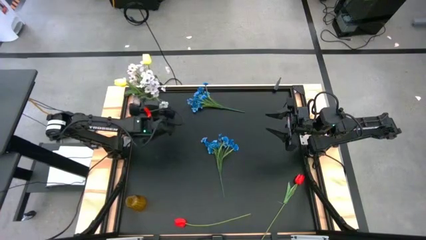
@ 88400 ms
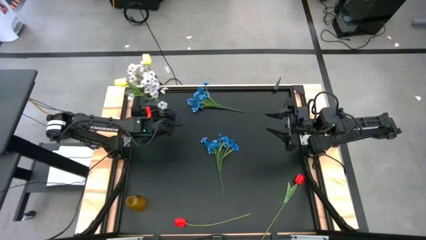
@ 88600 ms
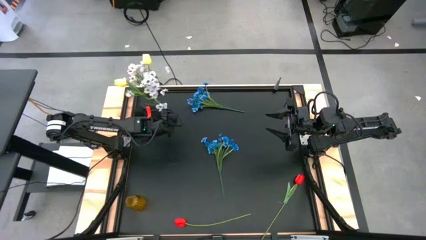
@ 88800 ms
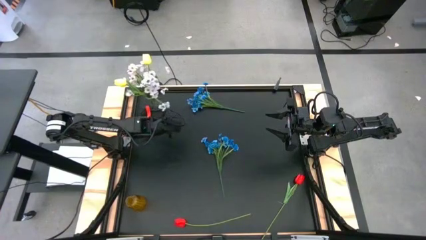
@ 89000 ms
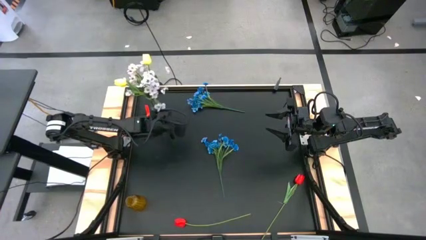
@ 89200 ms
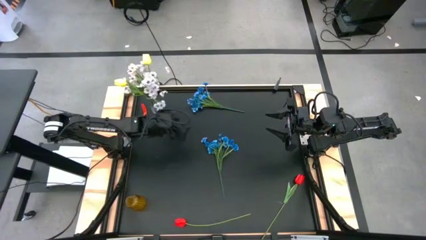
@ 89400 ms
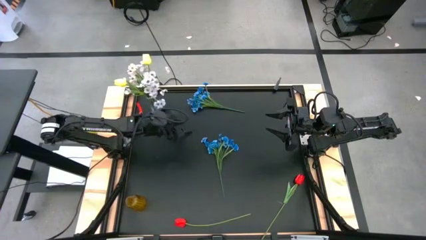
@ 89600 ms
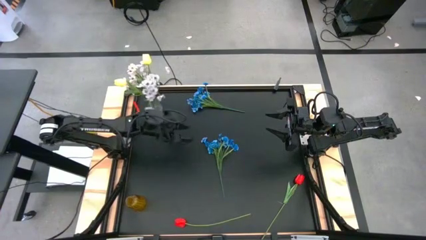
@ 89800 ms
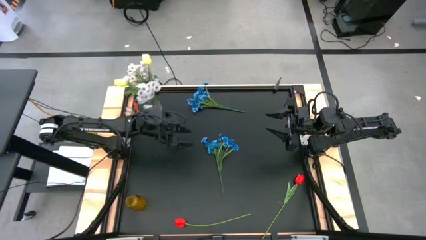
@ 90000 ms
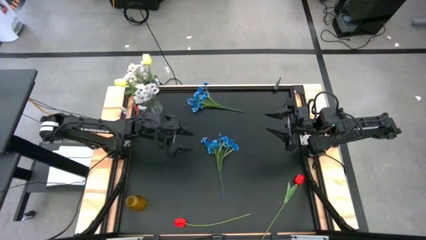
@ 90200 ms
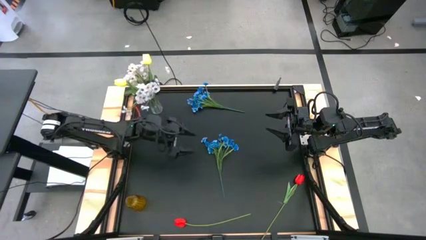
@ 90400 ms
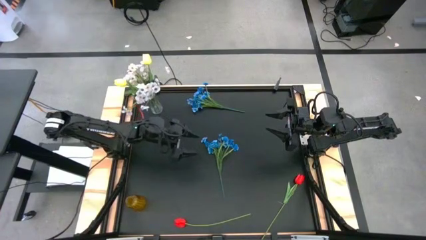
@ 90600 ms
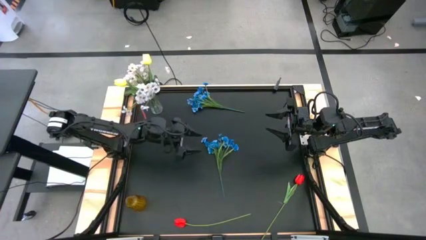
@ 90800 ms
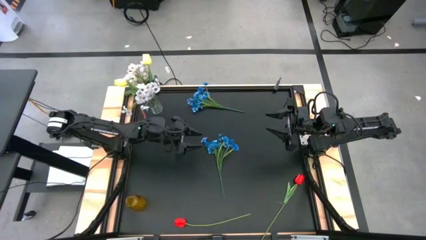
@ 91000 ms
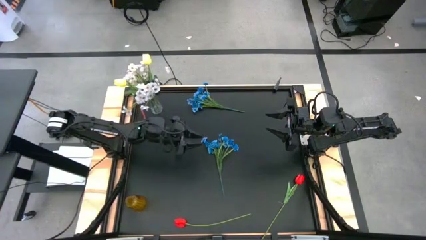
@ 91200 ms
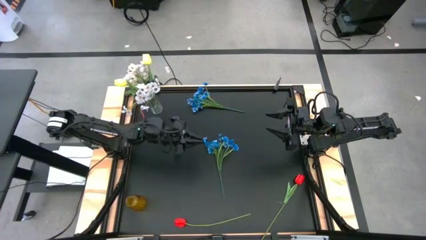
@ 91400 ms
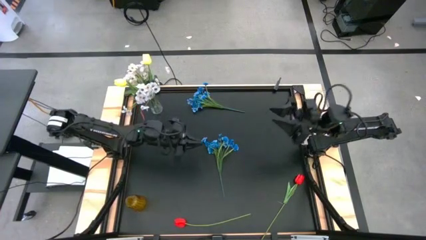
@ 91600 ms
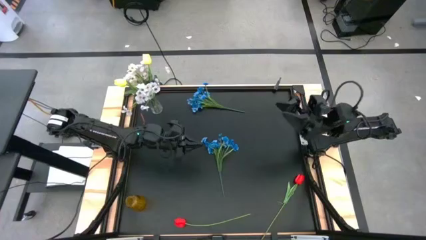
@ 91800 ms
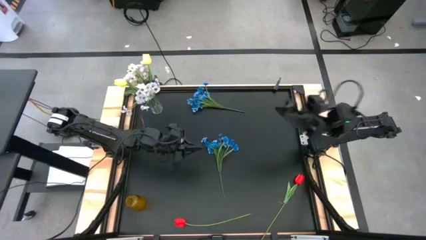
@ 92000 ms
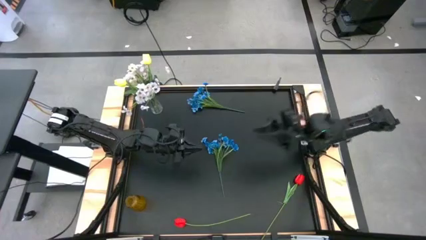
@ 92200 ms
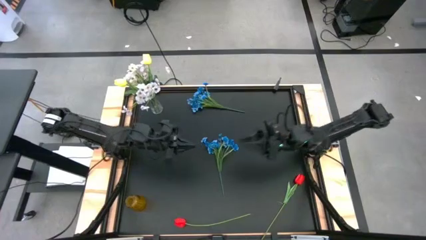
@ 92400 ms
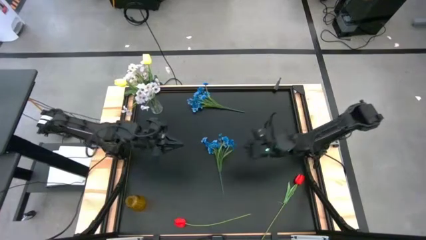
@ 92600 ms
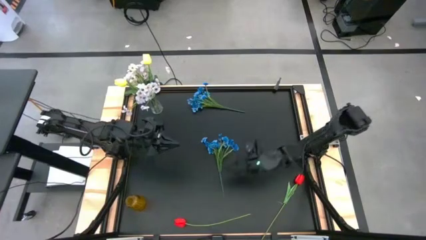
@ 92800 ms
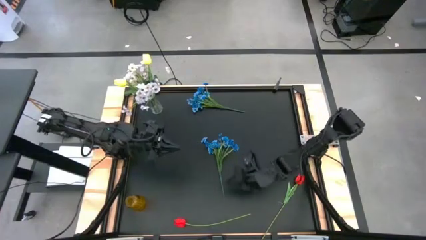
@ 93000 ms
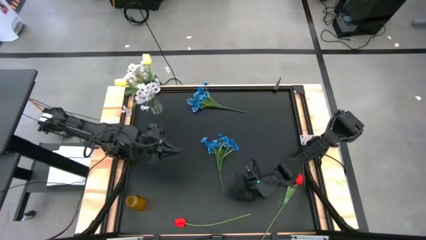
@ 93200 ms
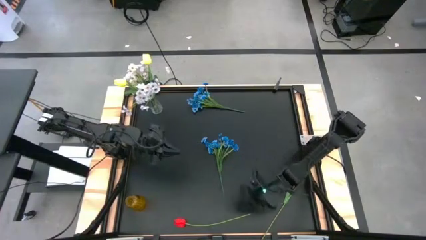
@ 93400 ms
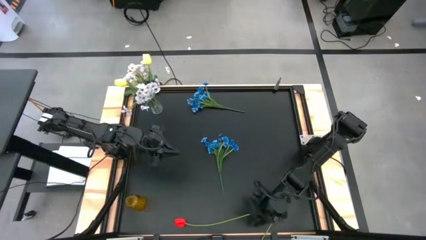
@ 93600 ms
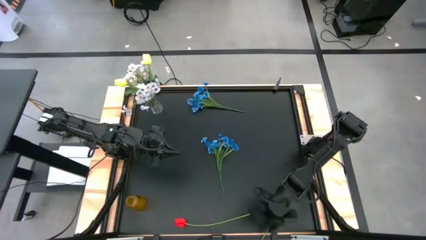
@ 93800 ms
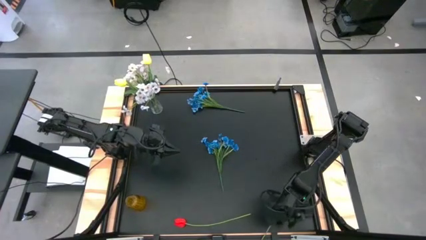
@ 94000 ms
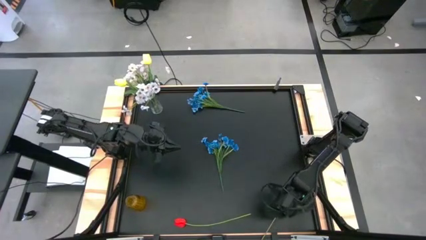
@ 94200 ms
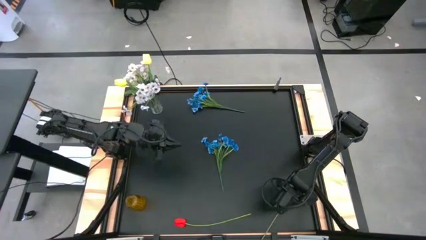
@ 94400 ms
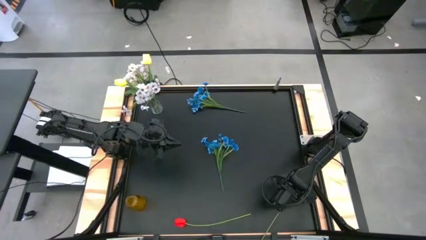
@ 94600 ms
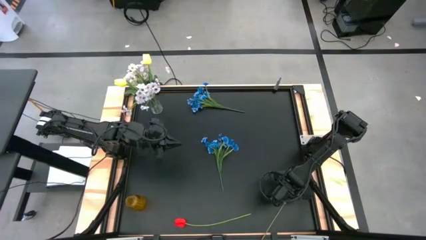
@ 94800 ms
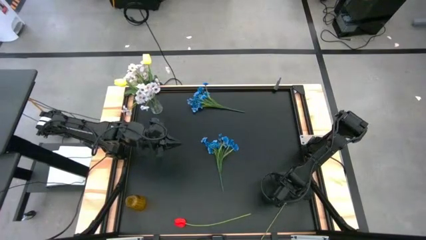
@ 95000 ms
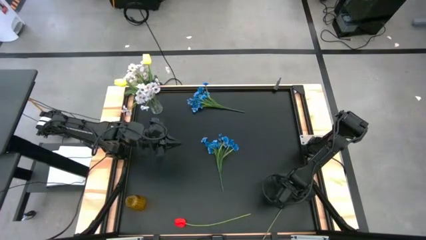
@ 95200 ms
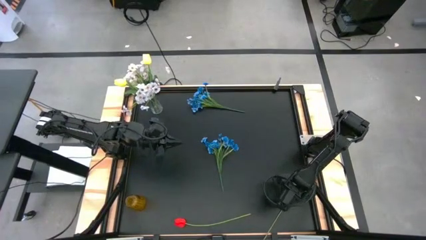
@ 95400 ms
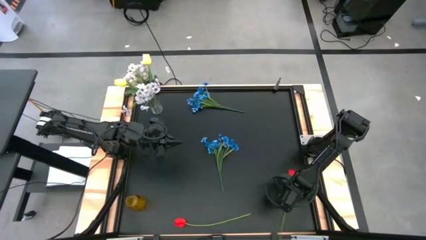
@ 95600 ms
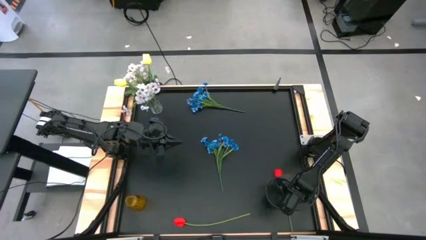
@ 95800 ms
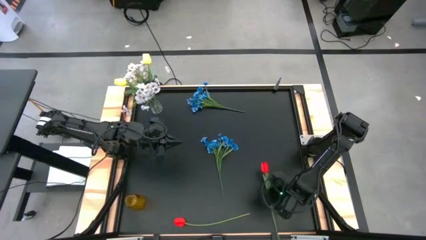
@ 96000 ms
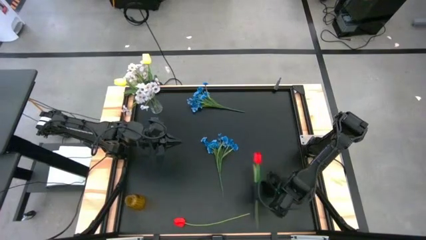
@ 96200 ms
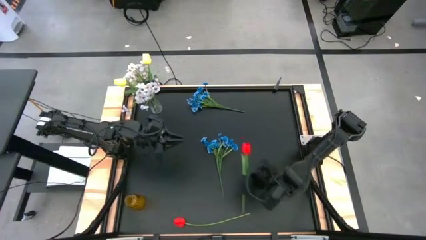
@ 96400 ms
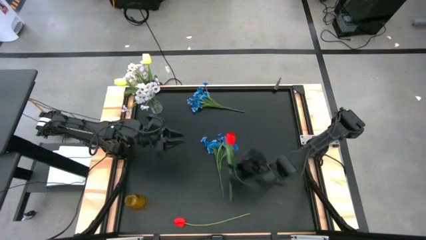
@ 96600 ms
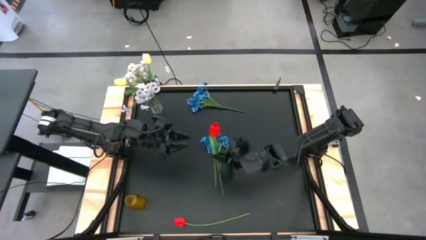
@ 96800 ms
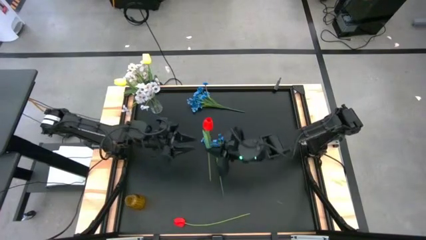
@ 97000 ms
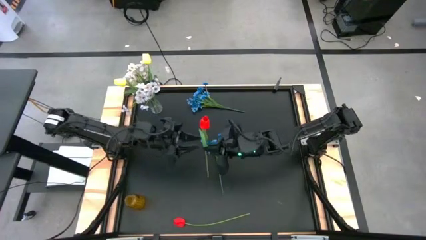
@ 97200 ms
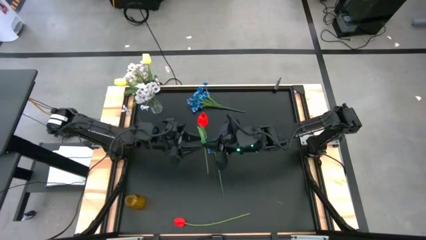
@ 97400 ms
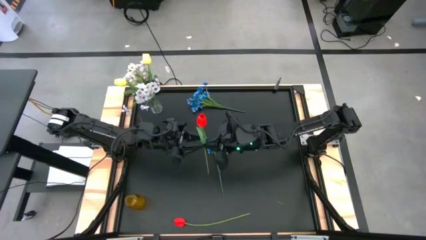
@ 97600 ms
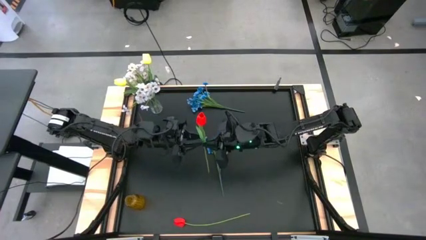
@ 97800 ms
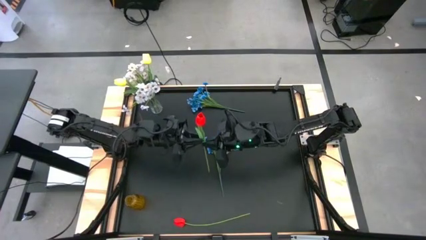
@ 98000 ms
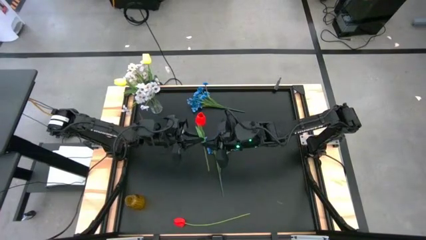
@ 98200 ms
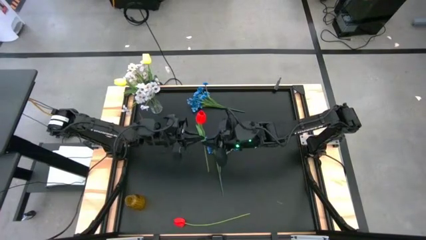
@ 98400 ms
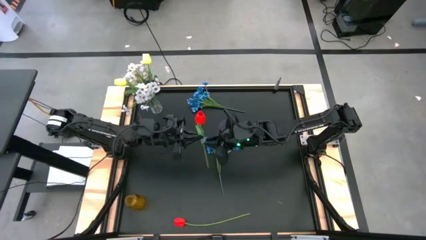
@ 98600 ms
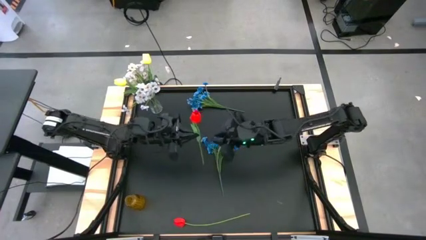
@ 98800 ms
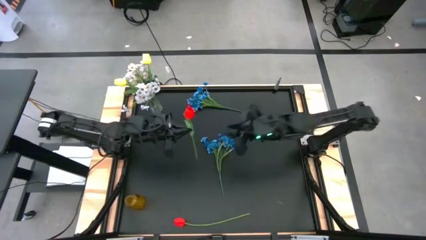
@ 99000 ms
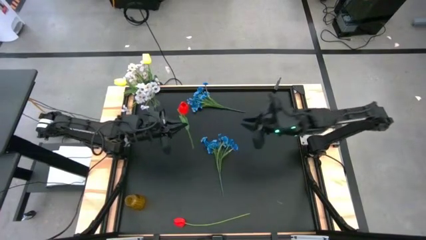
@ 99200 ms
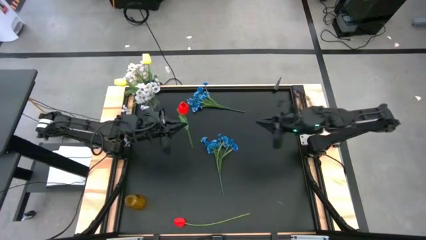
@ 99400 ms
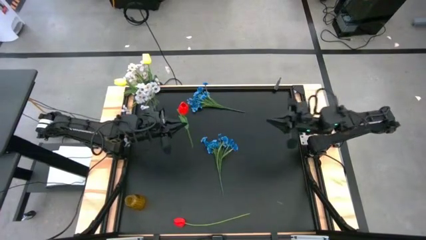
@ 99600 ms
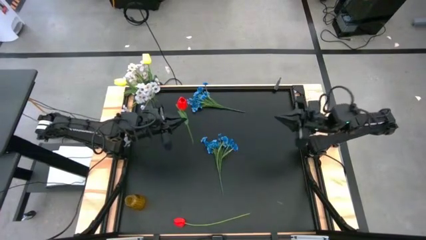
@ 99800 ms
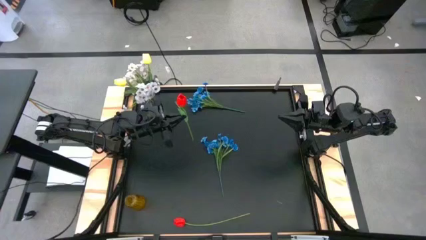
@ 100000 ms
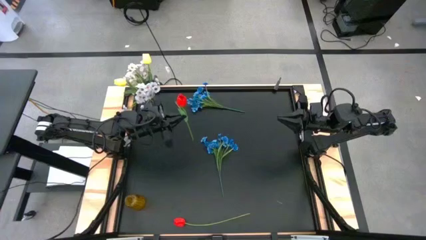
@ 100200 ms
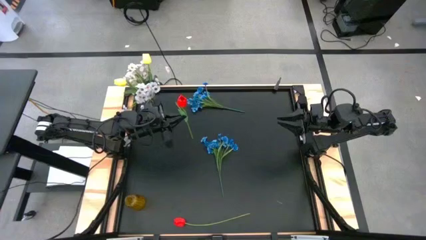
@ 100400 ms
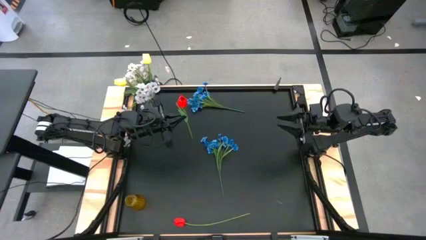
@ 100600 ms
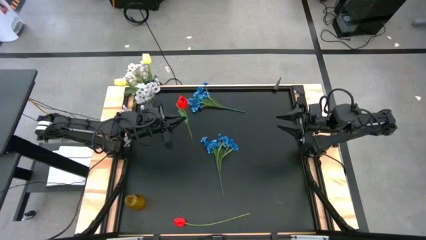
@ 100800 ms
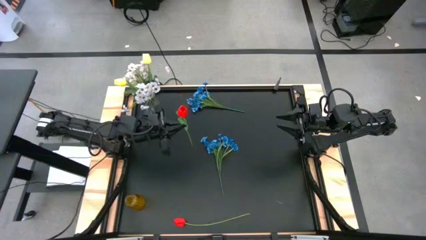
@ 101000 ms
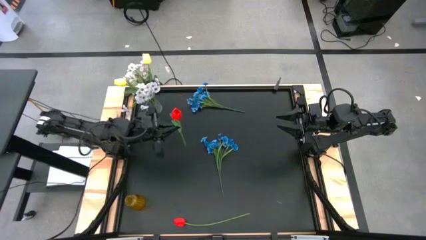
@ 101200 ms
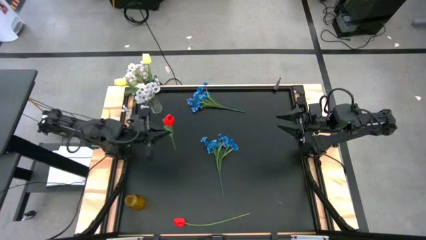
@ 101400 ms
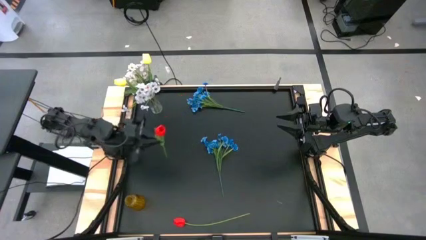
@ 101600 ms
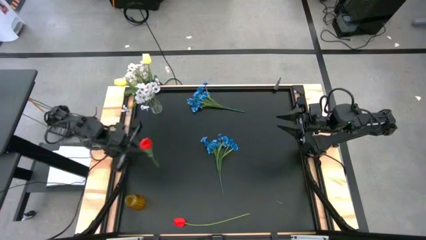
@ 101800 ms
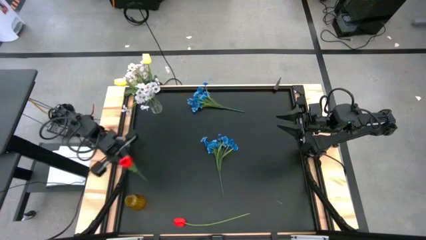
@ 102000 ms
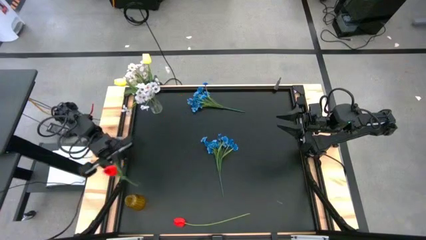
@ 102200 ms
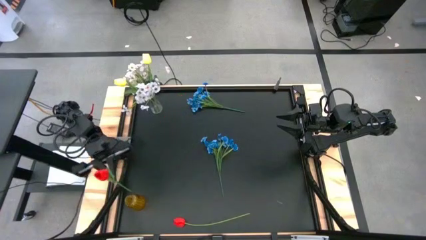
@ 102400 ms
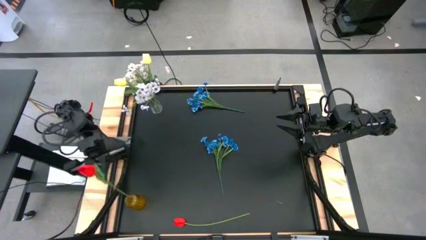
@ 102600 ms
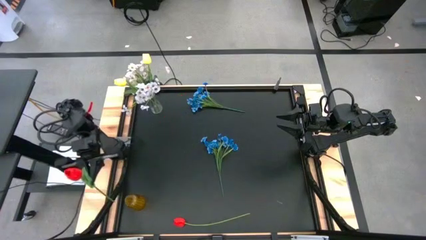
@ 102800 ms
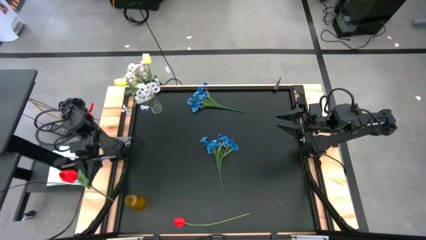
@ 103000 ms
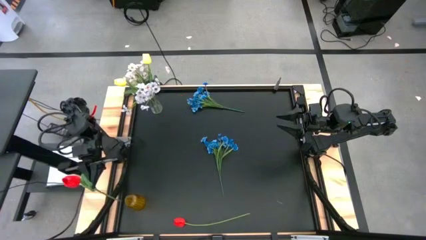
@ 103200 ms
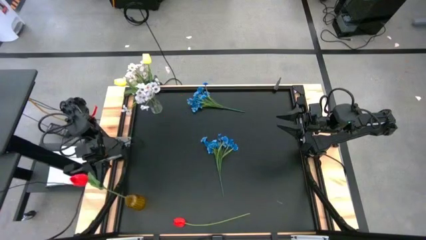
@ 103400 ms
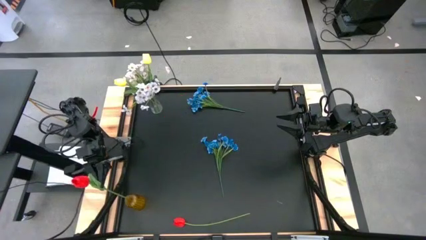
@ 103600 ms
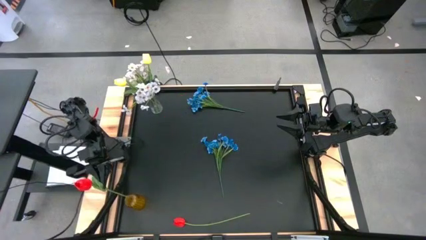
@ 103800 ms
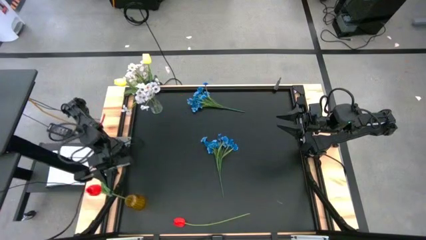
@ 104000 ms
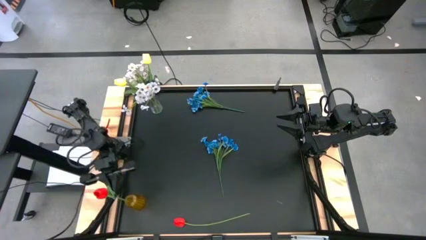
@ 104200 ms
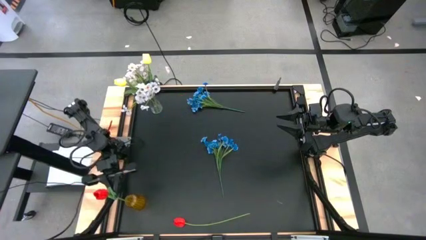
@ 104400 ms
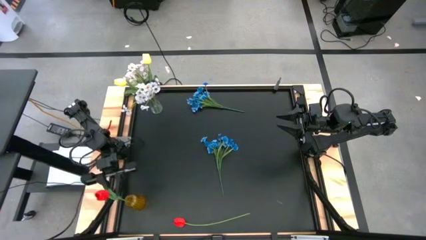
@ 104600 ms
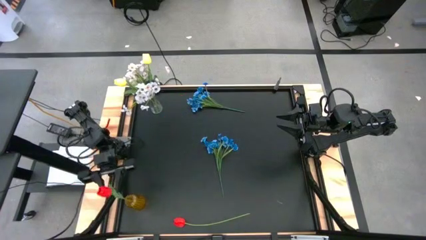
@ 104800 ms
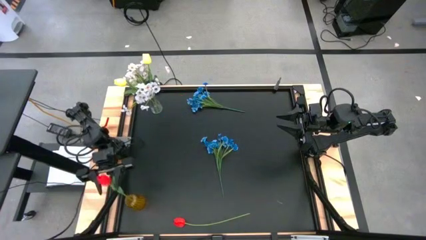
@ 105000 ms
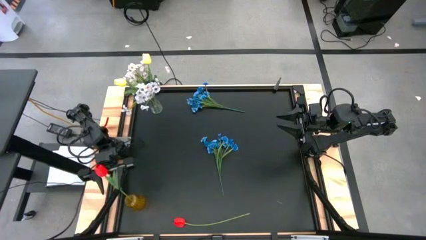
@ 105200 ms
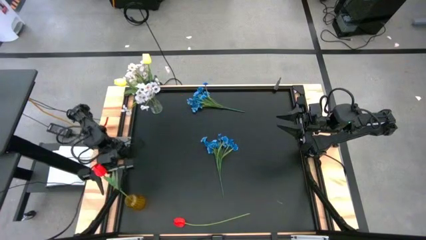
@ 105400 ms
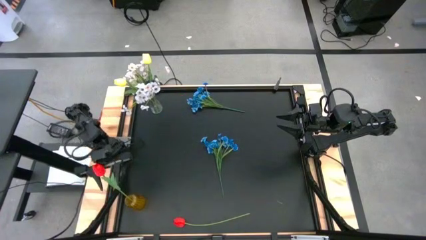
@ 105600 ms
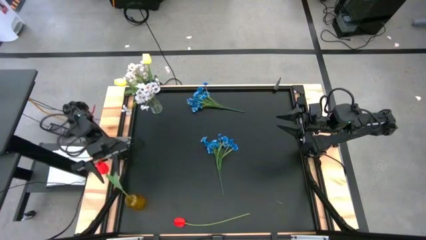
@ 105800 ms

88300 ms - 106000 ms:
Task: Sort flowers into vase by color
Put the right red flower into the yellow vase
